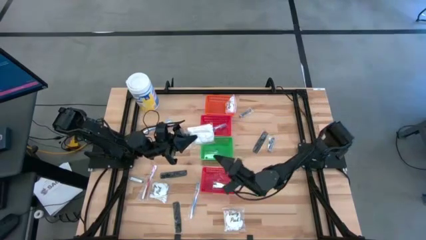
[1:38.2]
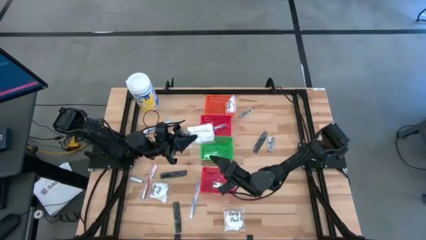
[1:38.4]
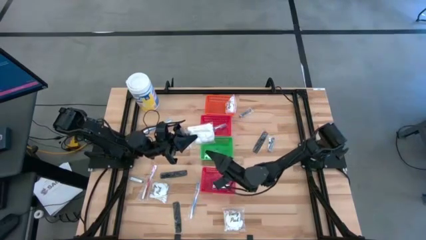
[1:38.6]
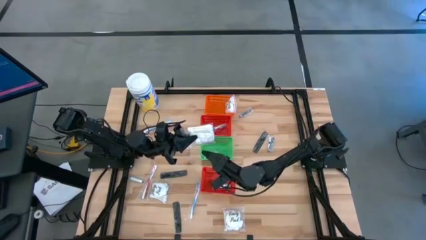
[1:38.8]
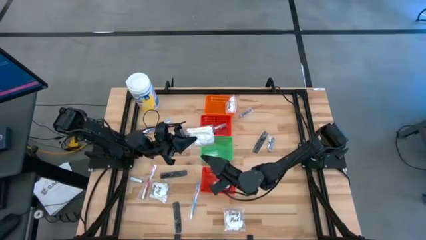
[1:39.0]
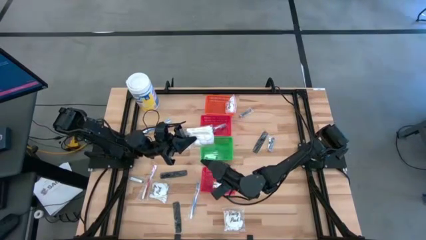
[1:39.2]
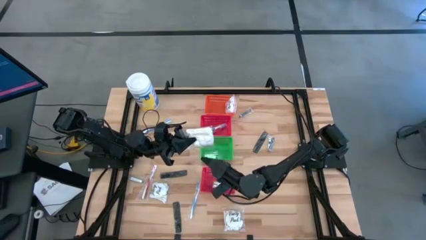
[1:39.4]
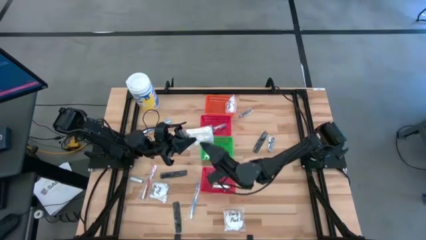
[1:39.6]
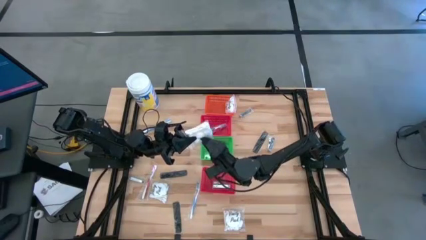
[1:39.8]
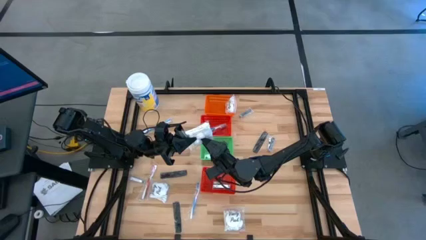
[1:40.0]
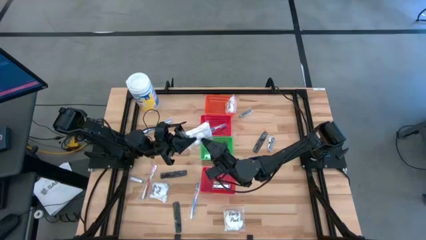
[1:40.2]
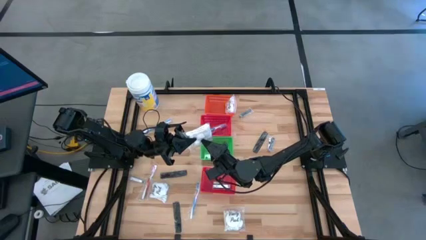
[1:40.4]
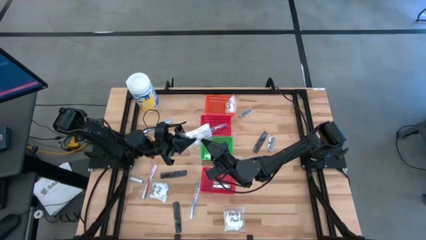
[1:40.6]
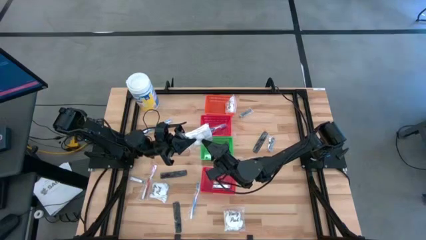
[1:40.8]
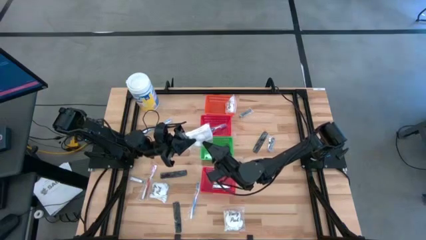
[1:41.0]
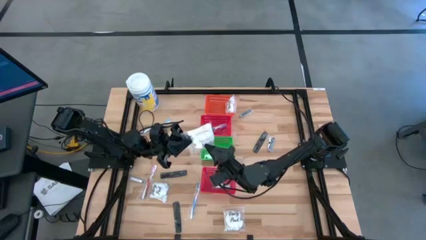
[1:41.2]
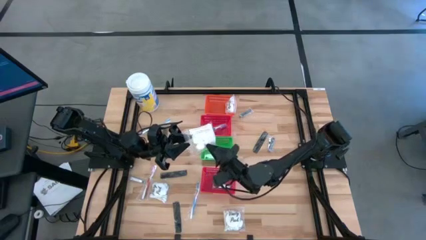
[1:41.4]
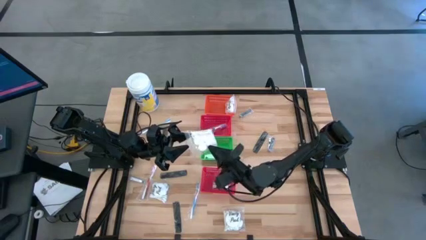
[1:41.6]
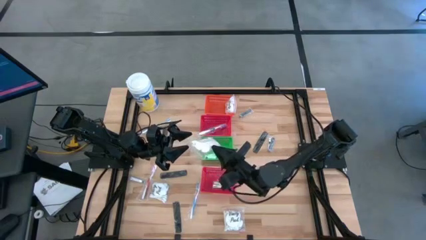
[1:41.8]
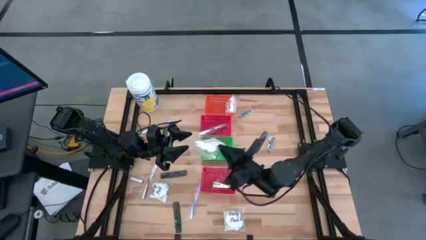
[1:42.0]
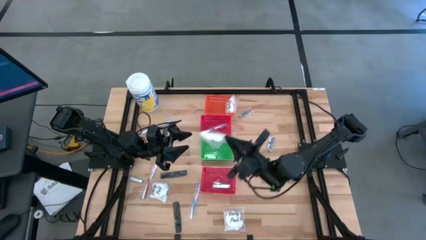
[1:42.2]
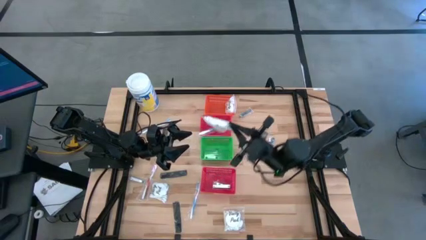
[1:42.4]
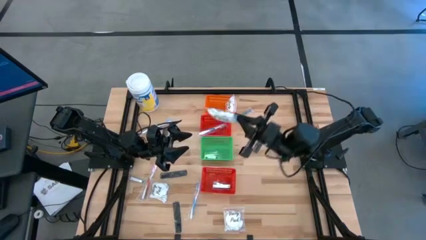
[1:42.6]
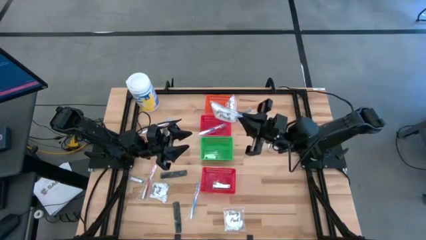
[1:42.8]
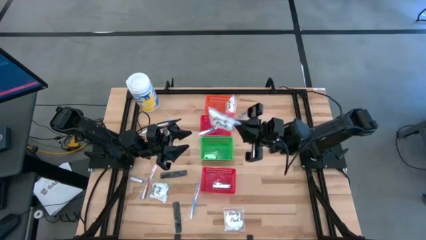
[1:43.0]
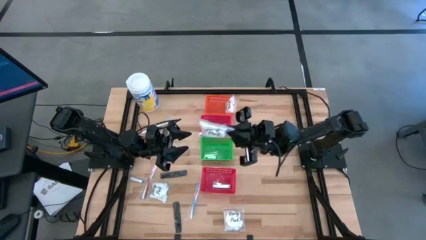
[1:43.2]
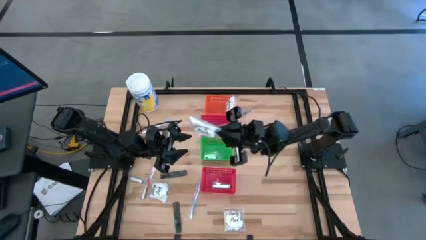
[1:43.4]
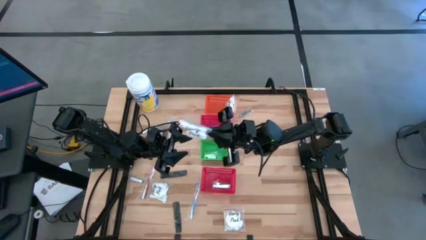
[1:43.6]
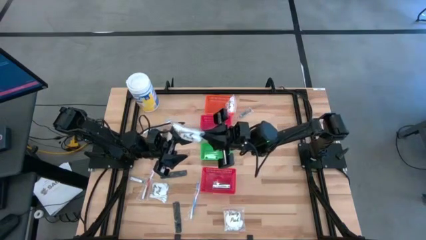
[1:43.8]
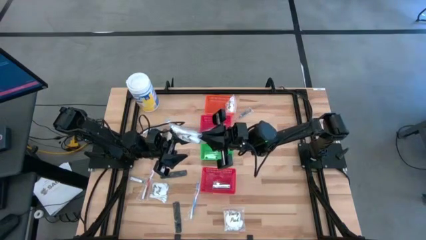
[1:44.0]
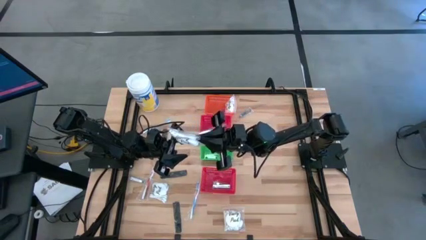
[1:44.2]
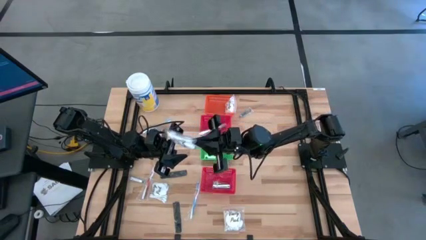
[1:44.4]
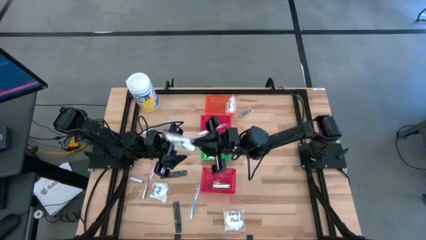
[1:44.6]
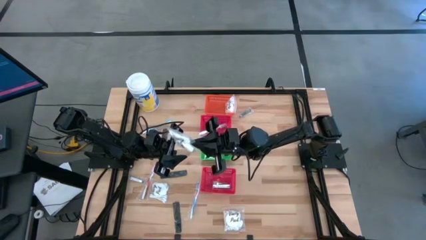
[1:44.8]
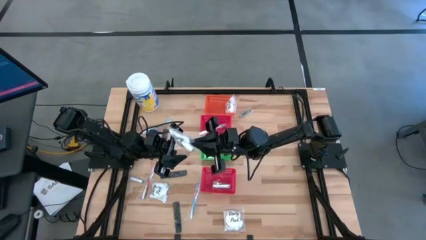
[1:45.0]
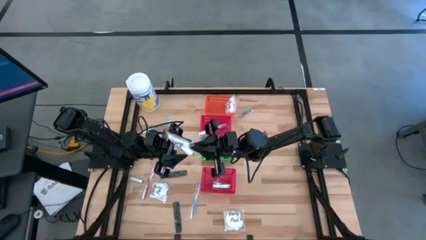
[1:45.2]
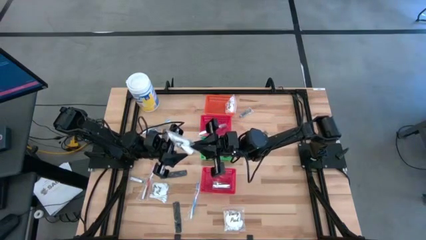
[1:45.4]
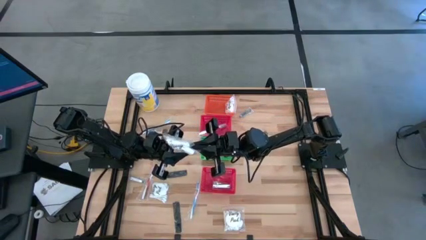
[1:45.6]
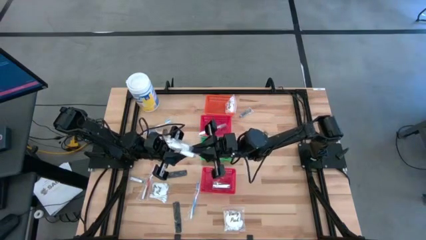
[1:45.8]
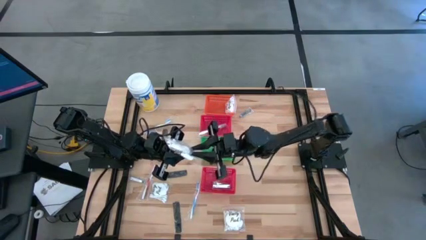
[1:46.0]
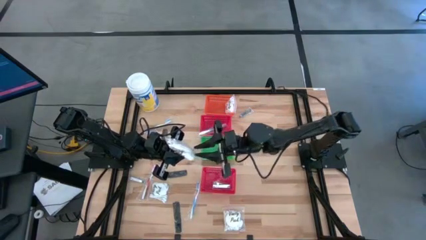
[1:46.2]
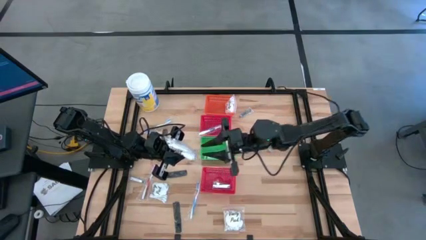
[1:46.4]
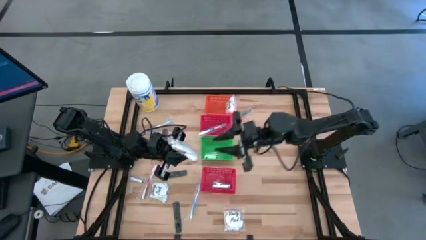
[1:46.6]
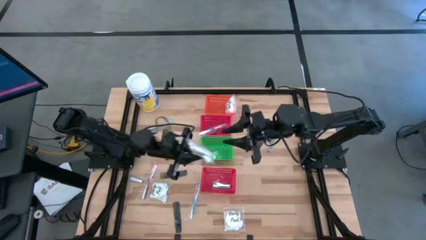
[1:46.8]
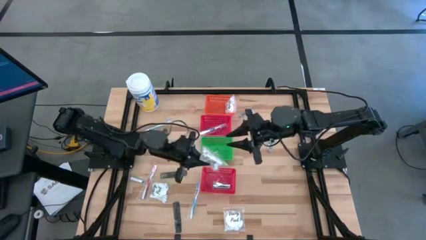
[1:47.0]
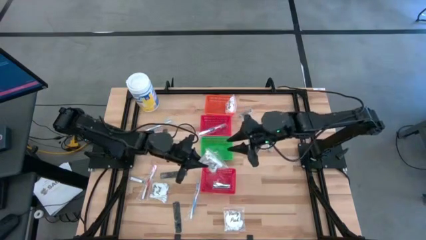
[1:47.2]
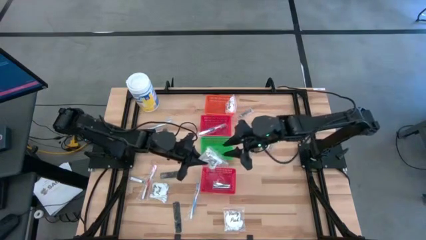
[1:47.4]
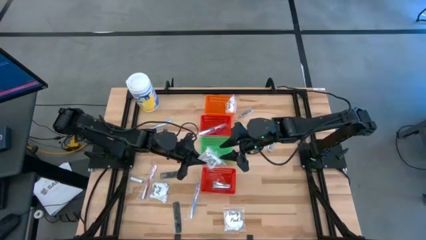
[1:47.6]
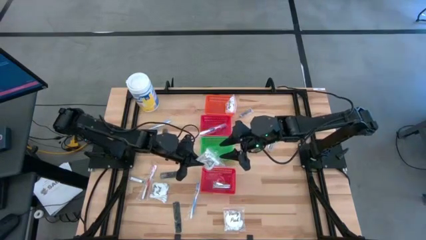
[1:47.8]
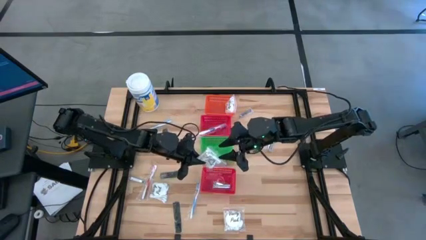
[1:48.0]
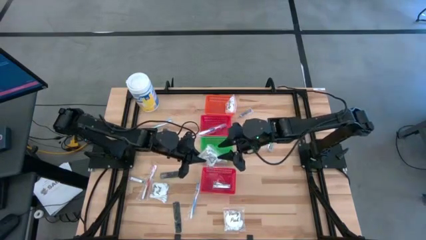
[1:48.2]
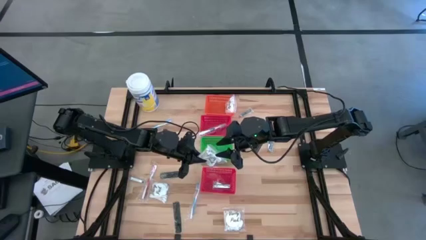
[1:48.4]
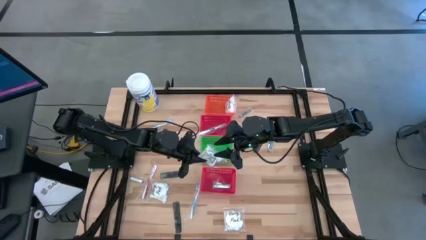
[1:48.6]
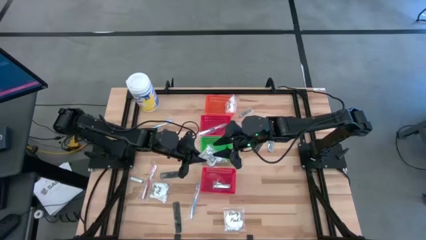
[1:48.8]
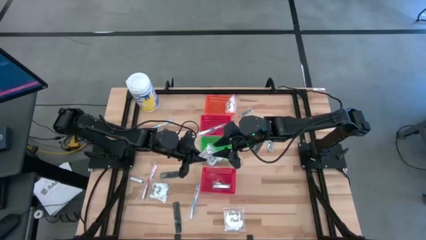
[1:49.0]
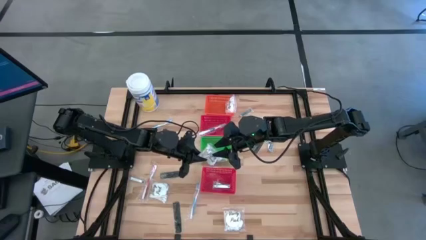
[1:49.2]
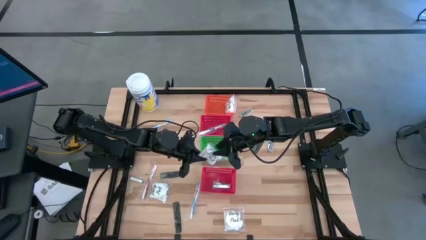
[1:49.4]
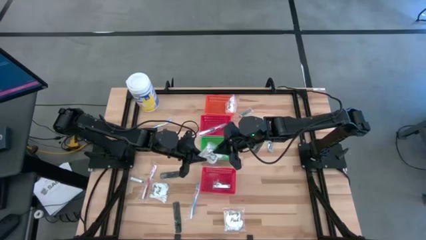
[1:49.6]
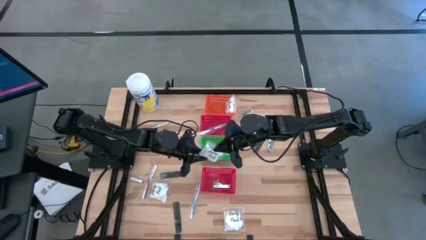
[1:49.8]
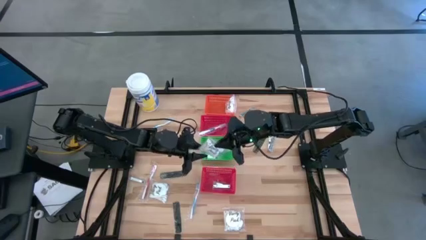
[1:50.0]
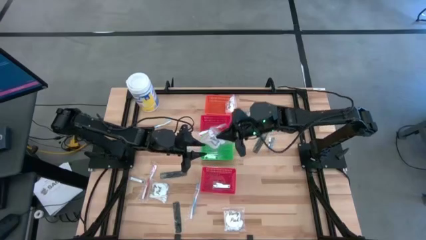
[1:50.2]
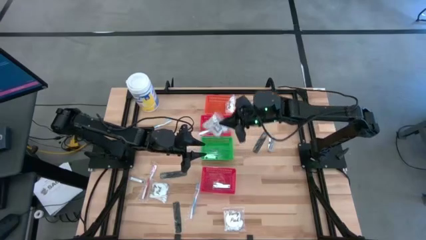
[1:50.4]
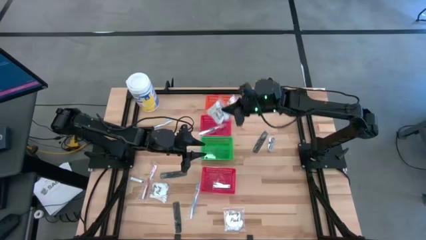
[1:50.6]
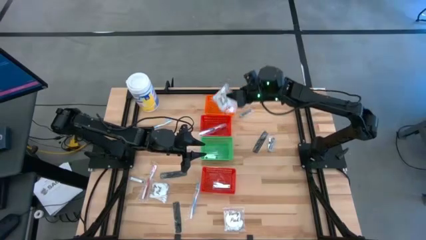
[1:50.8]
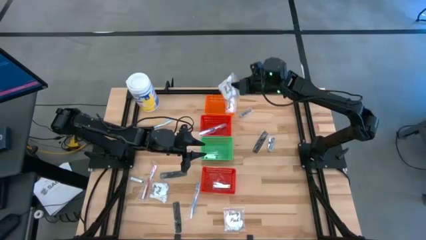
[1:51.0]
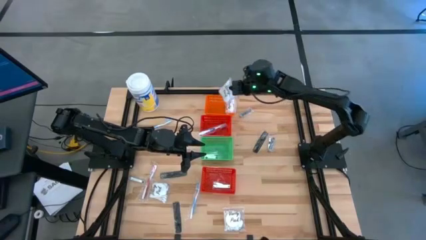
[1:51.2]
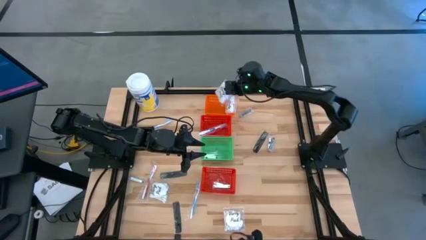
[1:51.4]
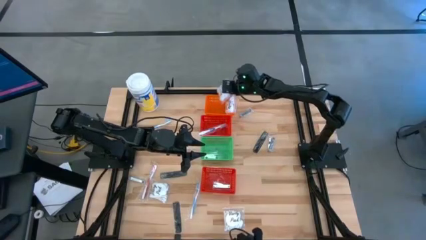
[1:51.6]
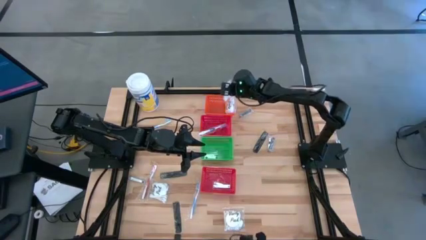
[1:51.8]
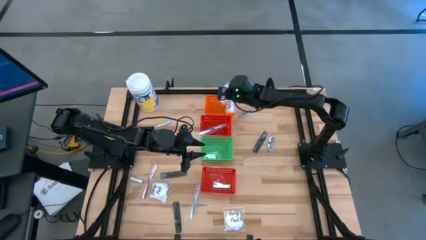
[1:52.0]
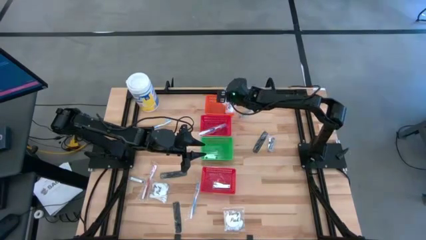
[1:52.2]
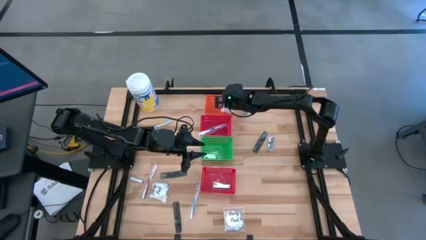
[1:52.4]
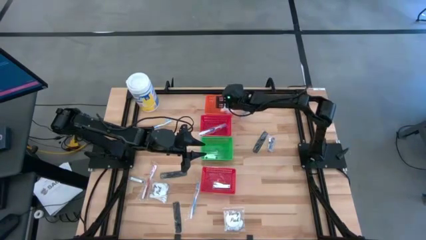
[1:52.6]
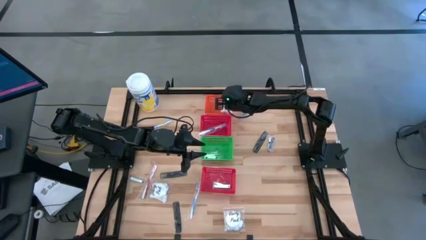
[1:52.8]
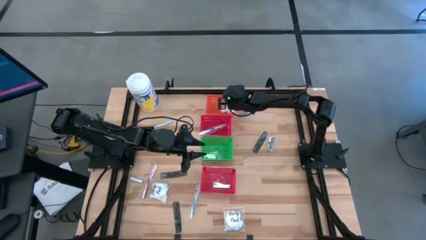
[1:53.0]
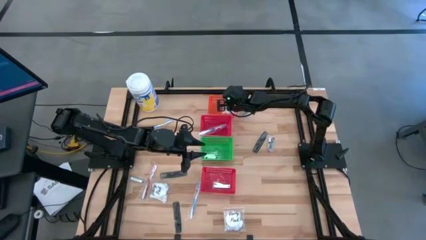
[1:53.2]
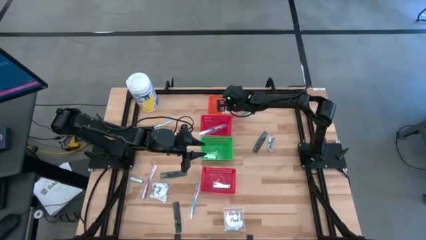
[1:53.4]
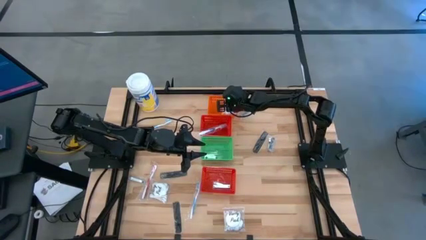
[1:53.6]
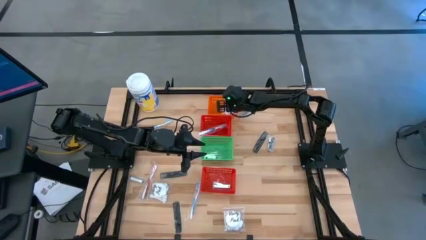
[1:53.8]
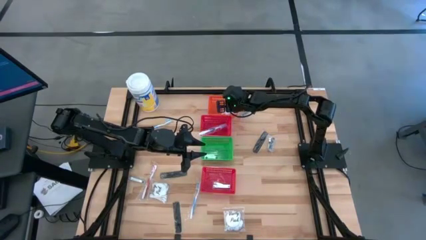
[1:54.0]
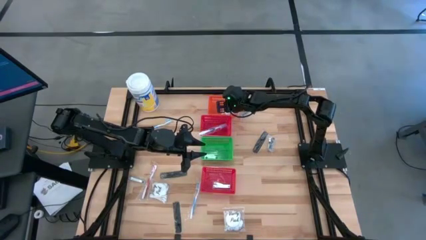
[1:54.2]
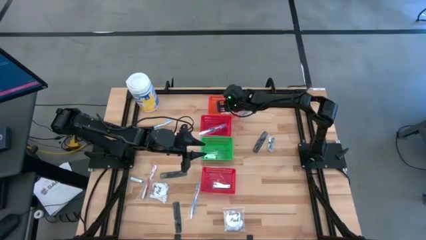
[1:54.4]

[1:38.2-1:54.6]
Task: Pick & Place Travel size toiletries
Put the transparent cotton pack into the orange basket
